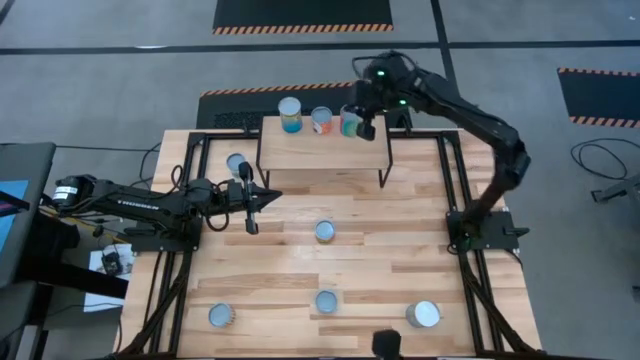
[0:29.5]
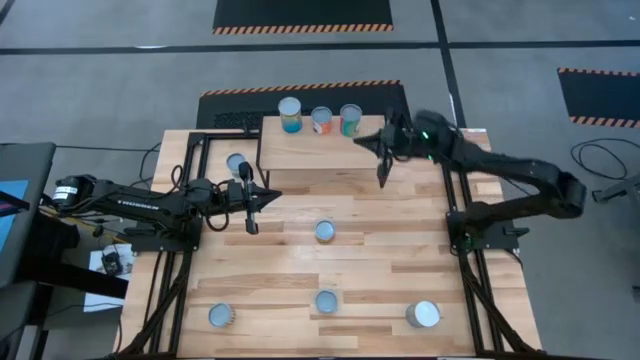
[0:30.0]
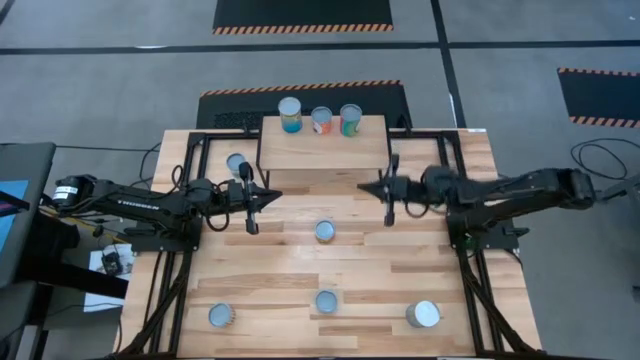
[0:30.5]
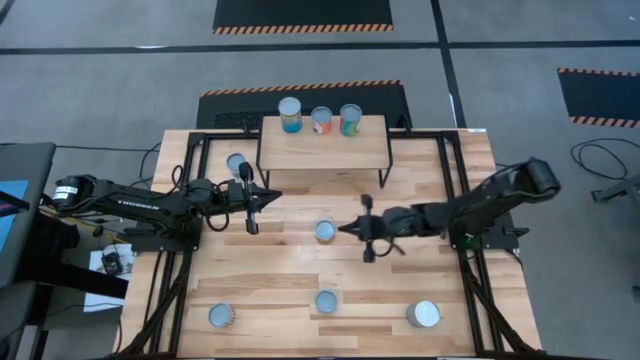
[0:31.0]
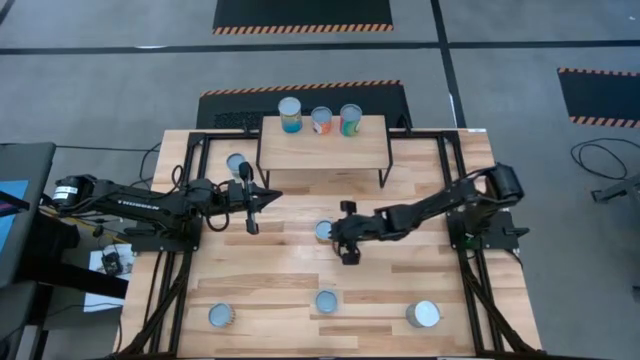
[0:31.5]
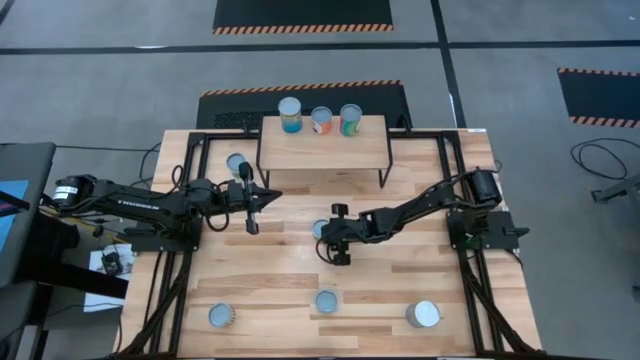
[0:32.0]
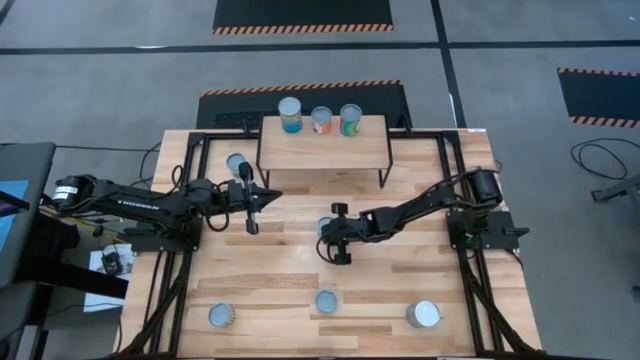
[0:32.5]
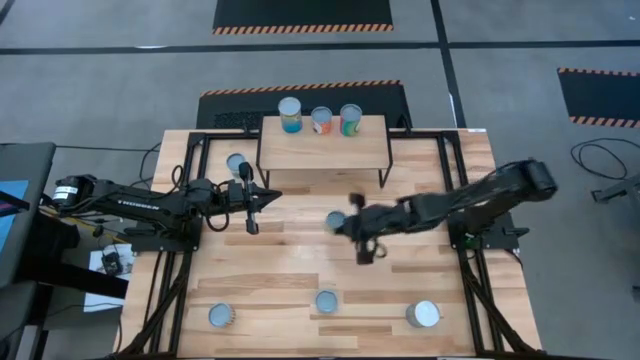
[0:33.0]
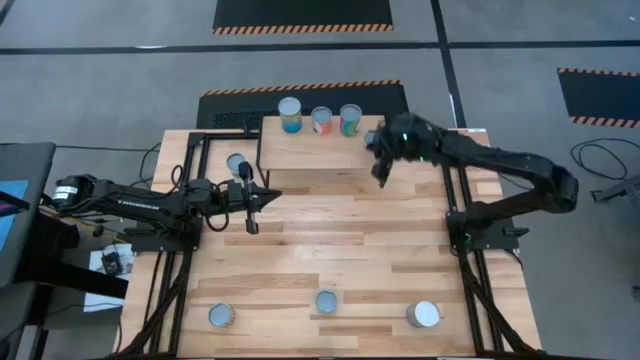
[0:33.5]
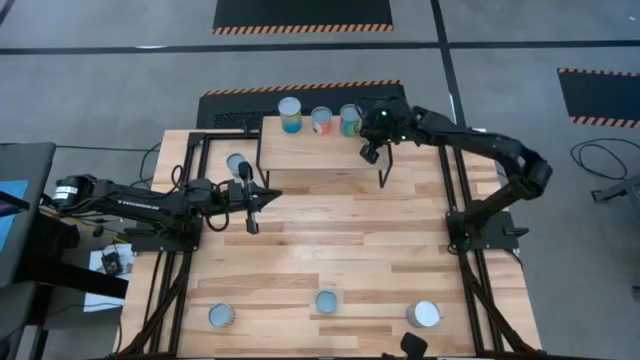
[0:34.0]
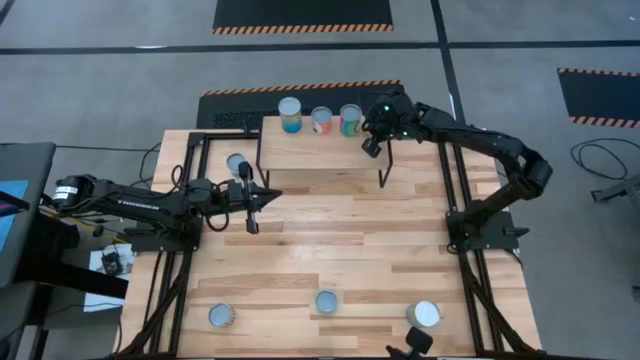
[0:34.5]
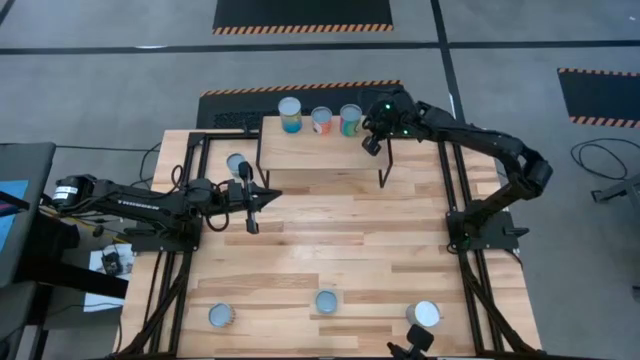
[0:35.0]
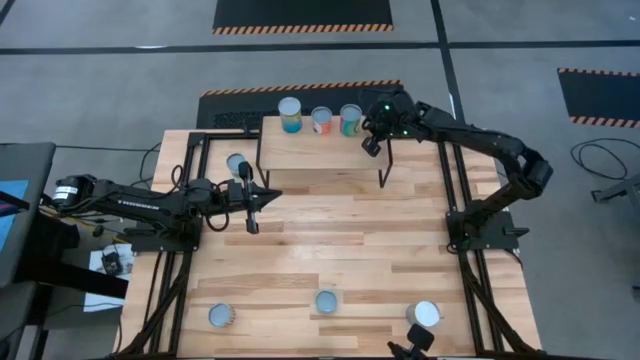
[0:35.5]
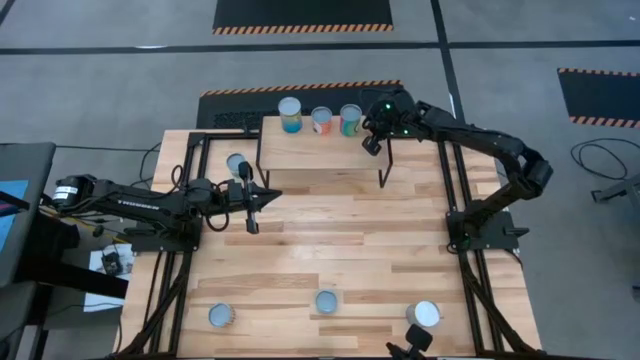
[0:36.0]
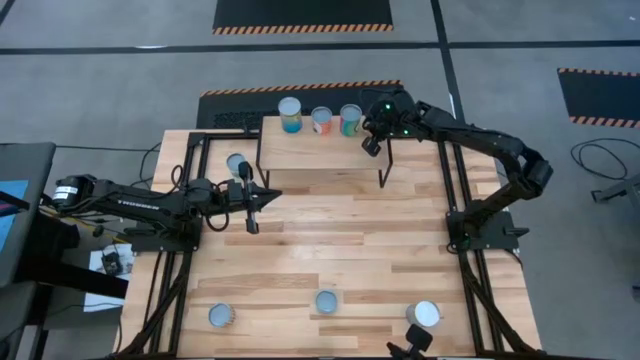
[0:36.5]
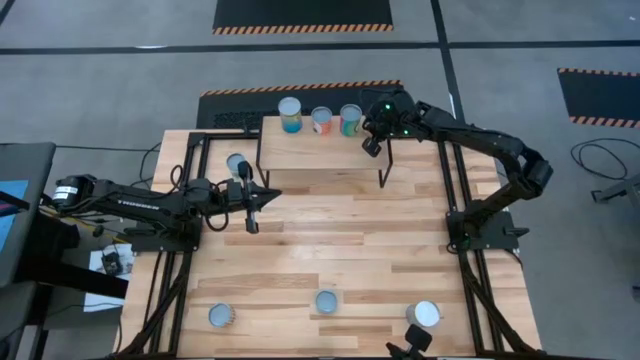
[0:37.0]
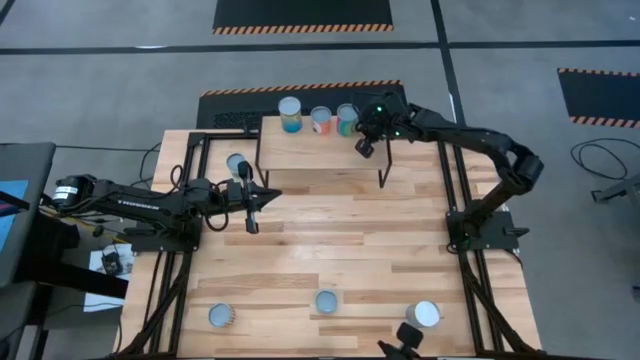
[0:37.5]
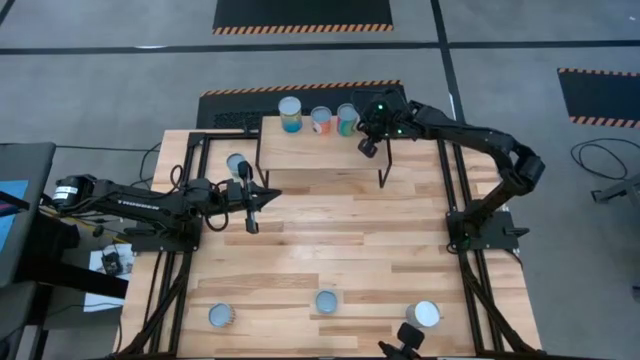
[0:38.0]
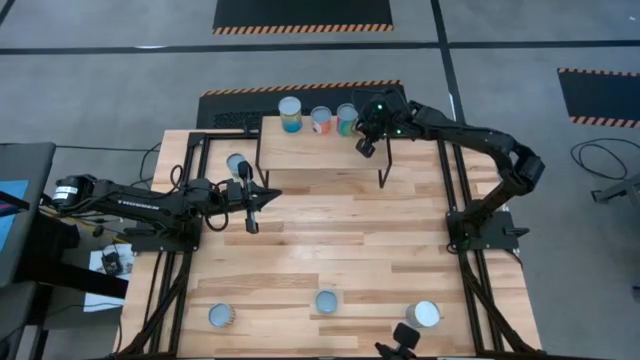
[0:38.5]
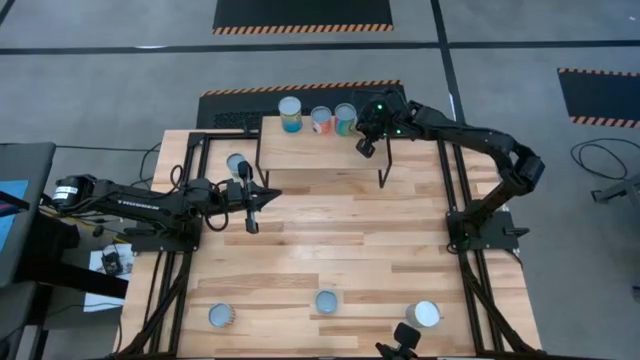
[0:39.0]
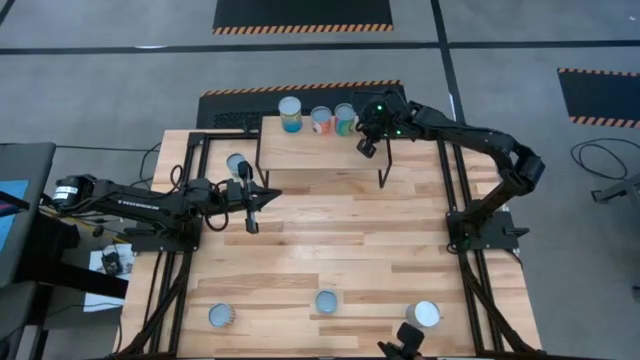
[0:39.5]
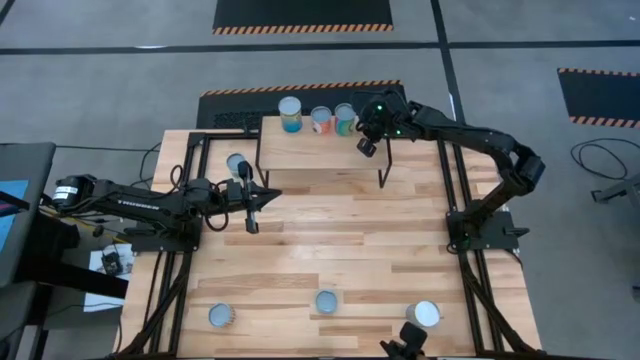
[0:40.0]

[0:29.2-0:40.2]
Task: Pick and place cans onto a shelf
Put the canned mushrooms on the shelf

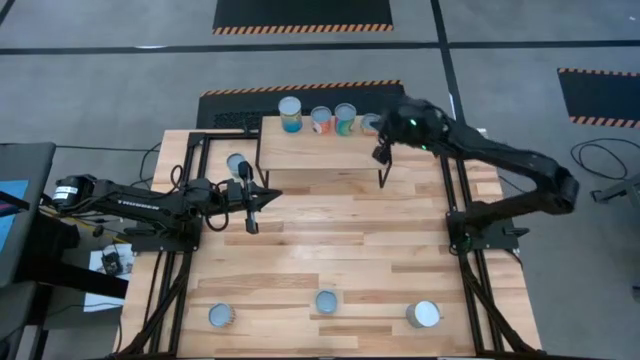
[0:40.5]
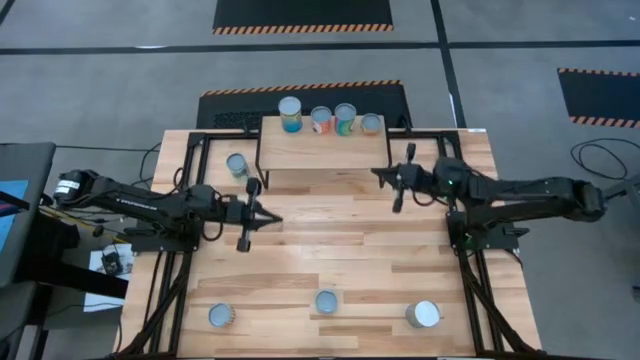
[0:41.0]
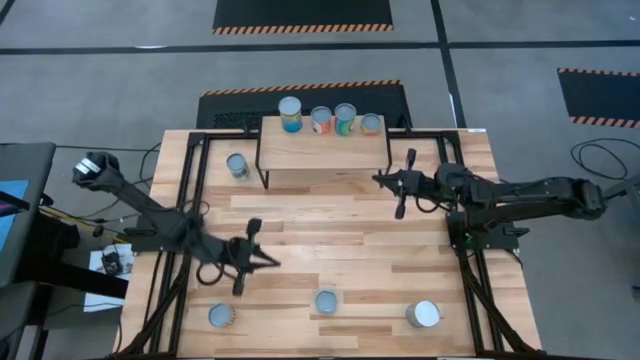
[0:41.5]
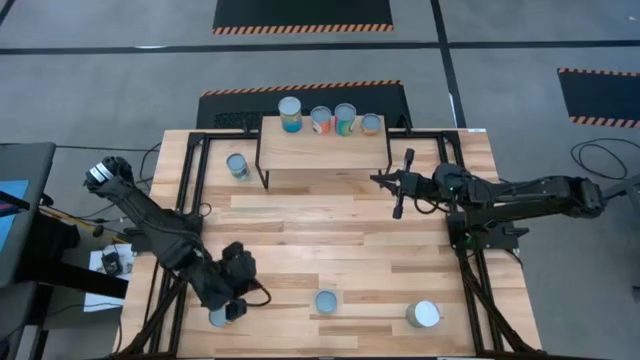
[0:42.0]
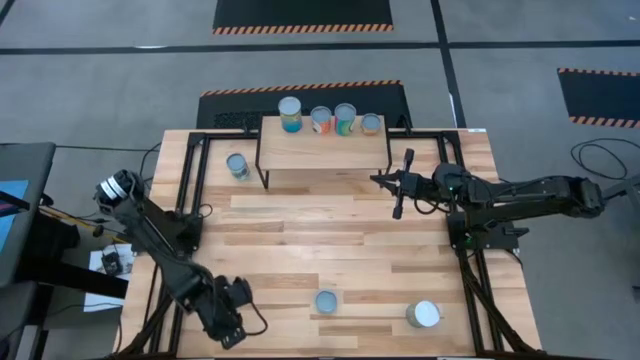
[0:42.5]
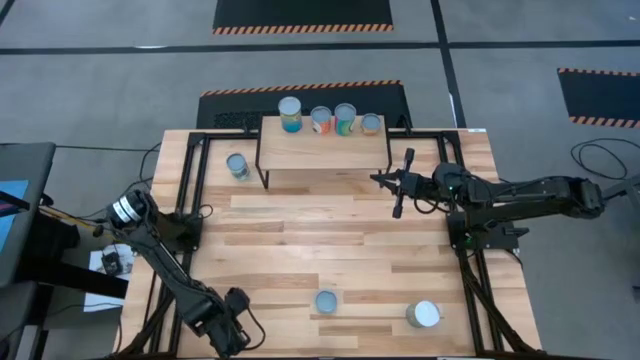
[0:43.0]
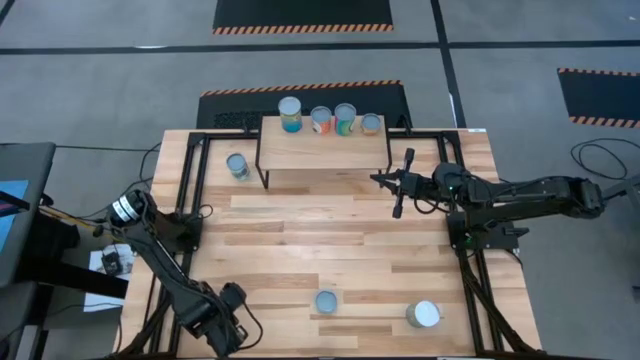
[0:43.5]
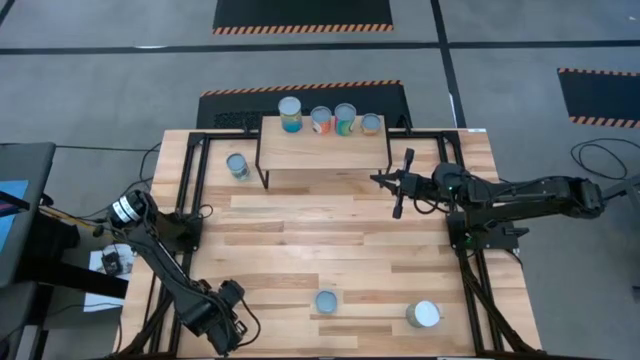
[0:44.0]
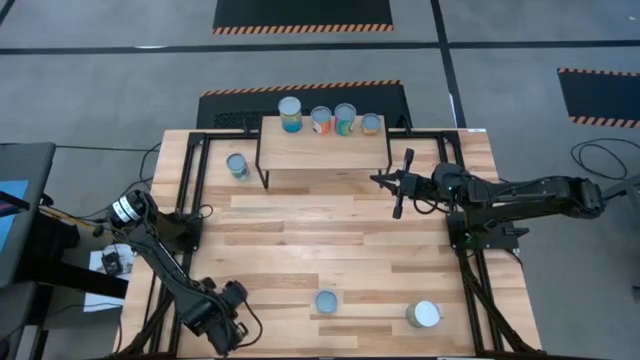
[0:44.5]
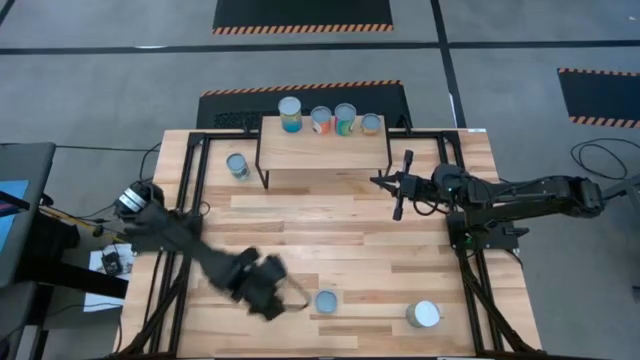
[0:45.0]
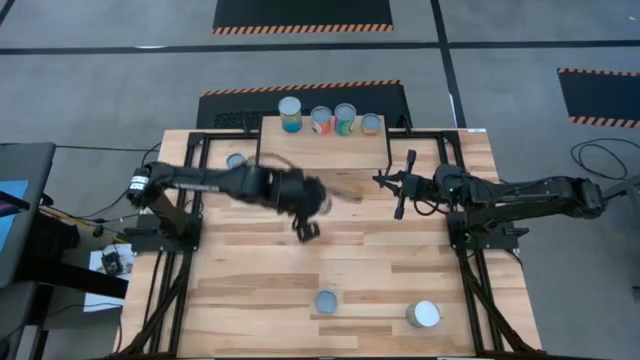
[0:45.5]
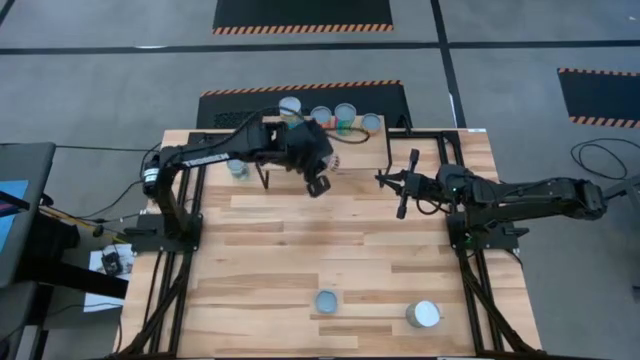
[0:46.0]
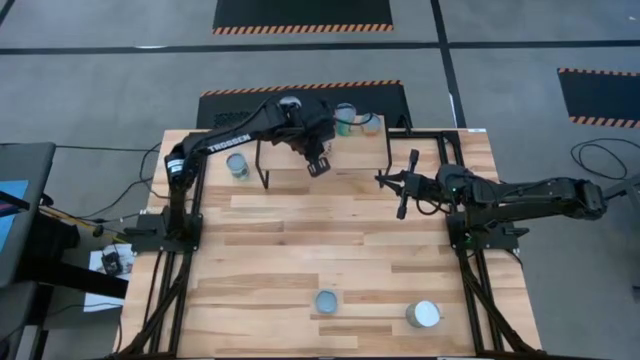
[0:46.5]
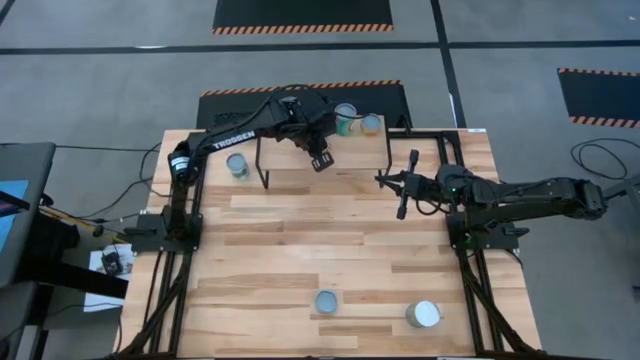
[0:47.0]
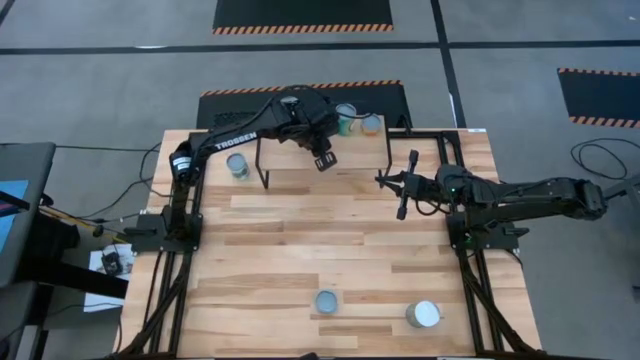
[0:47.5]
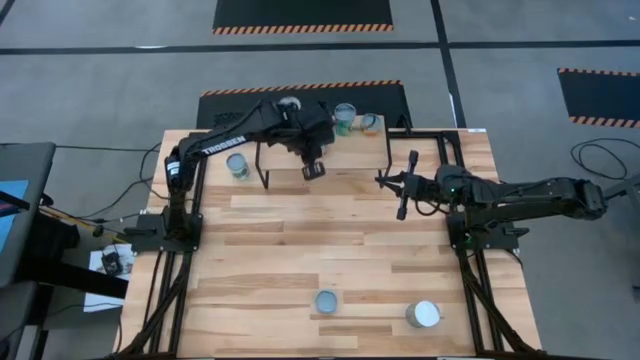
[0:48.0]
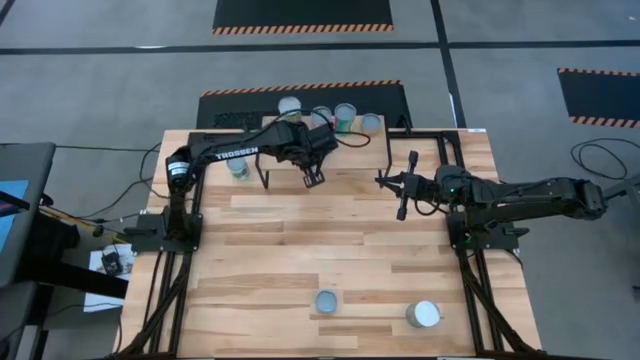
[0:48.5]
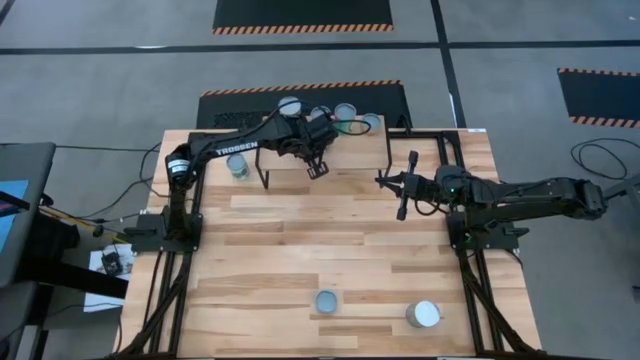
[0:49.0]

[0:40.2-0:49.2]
Put the canned spicy black beans on the shelf

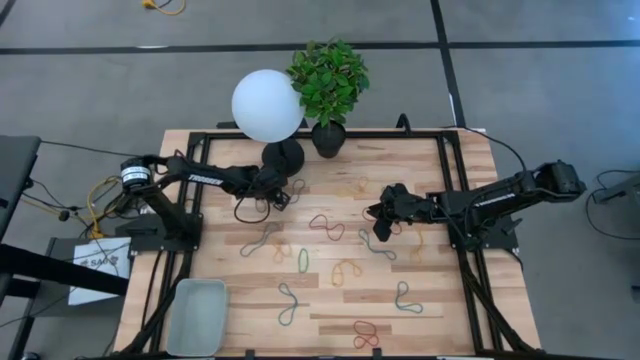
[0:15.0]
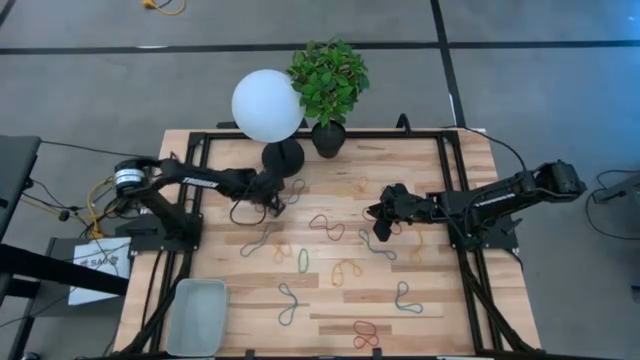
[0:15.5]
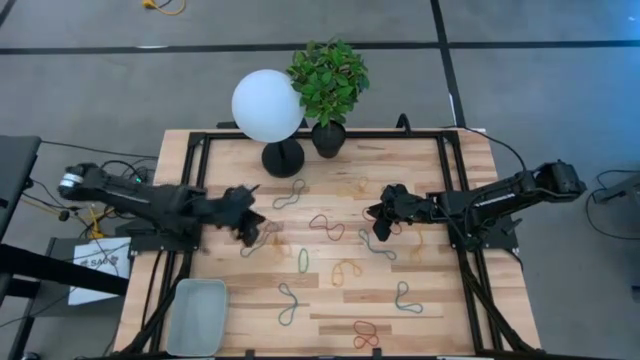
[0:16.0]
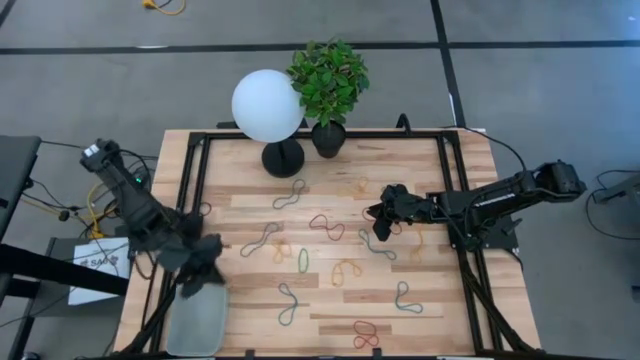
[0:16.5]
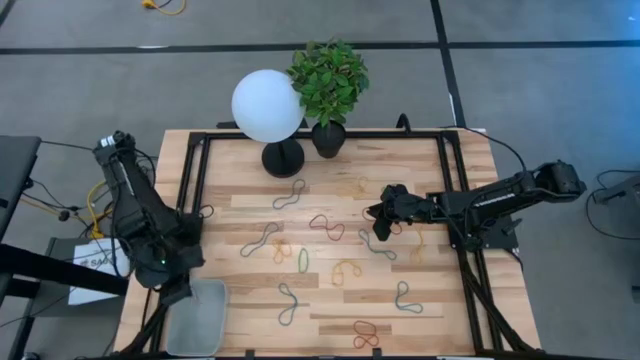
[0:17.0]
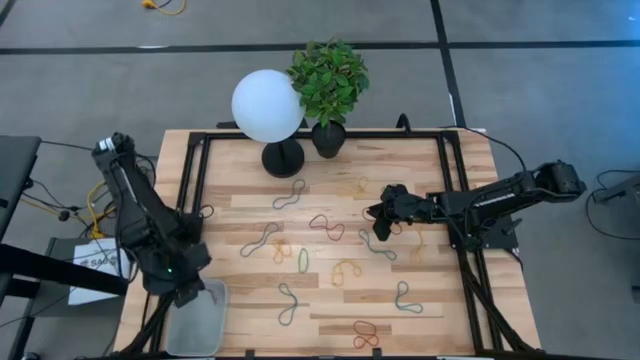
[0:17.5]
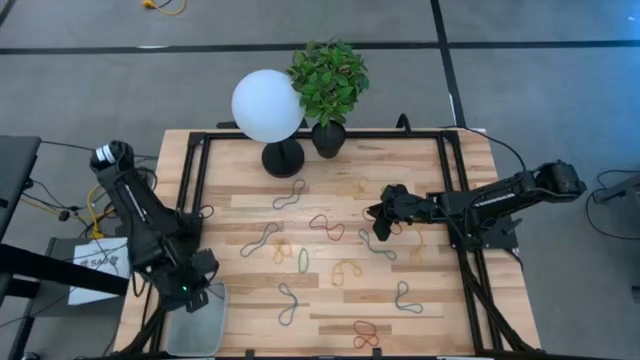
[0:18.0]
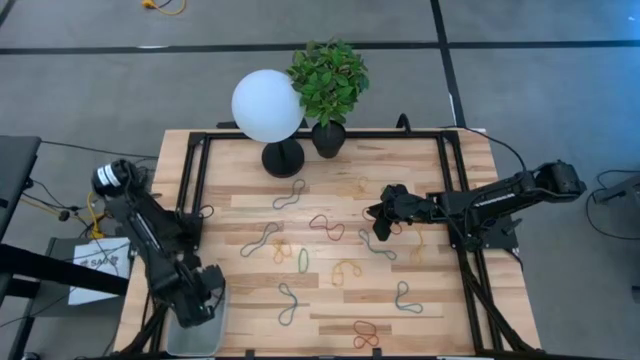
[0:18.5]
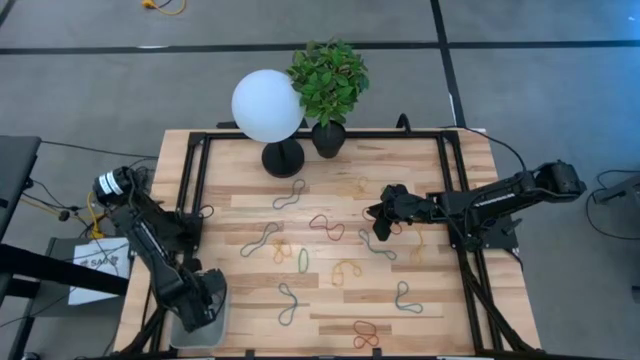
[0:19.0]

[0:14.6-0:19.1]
Task: Pick and place items into bin
Put the red rubber band into the gray bin
